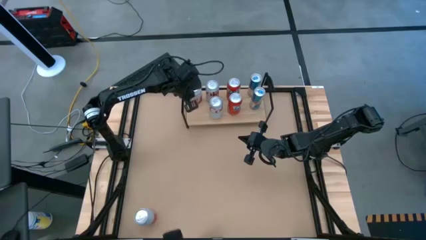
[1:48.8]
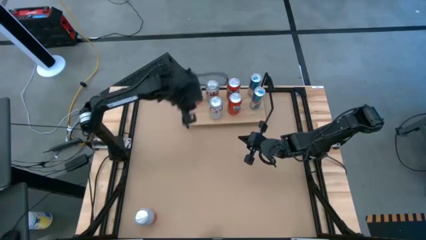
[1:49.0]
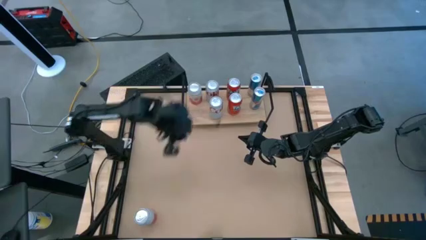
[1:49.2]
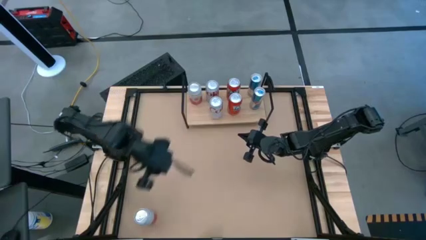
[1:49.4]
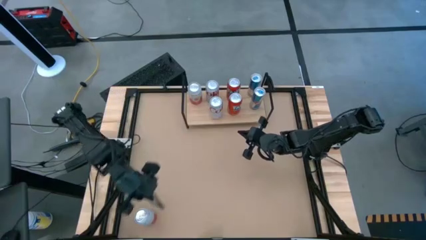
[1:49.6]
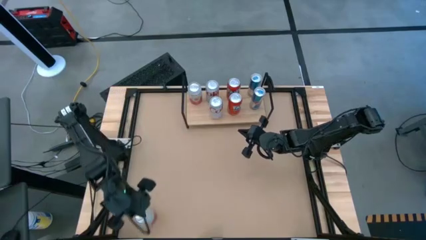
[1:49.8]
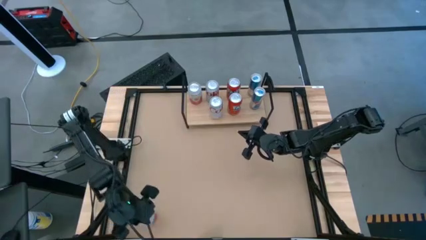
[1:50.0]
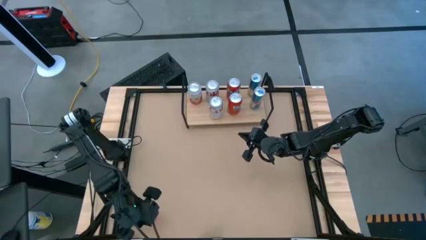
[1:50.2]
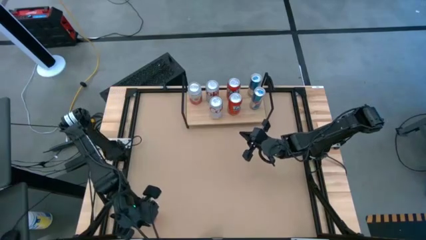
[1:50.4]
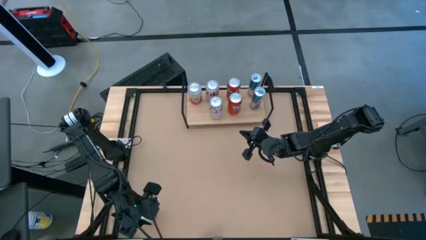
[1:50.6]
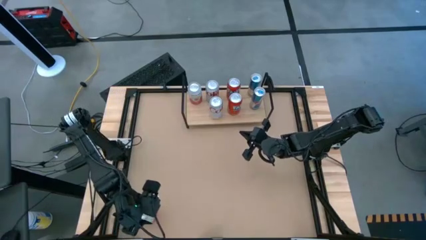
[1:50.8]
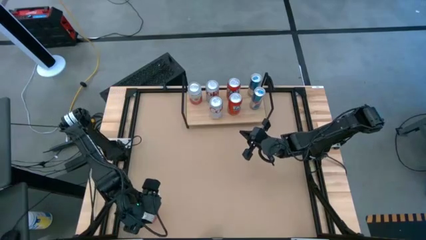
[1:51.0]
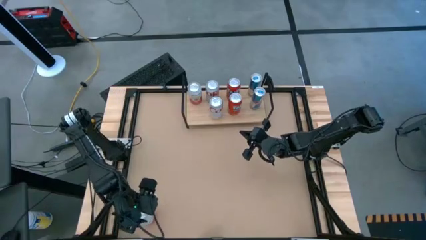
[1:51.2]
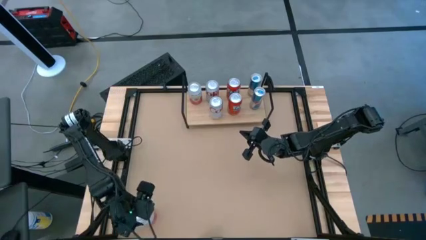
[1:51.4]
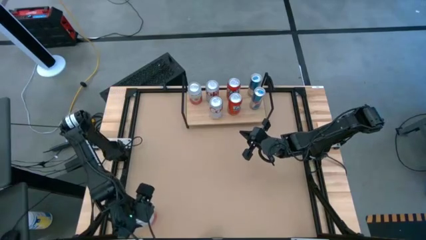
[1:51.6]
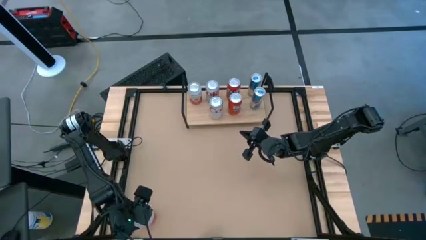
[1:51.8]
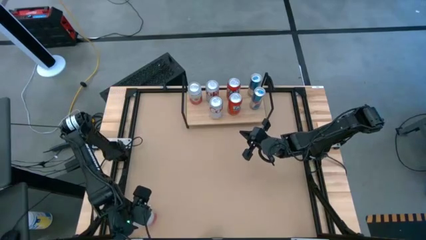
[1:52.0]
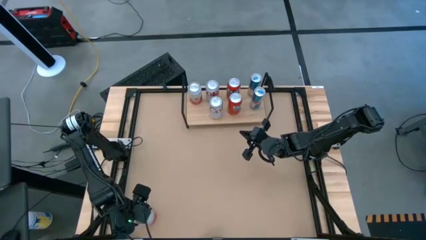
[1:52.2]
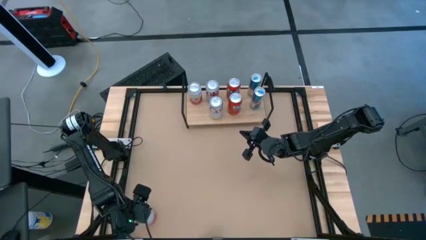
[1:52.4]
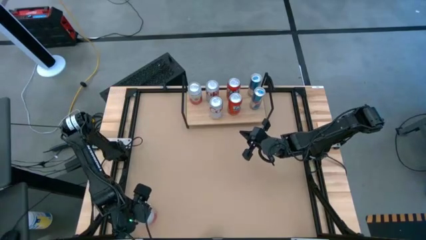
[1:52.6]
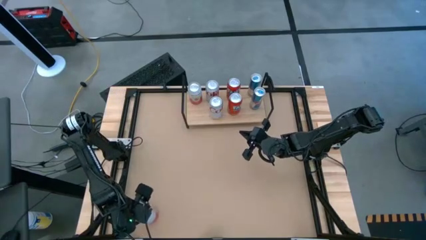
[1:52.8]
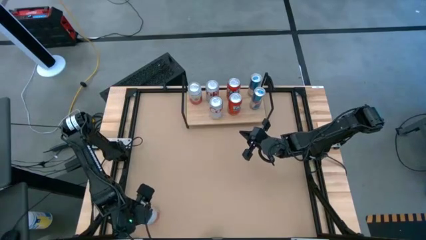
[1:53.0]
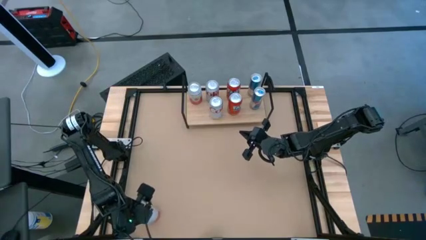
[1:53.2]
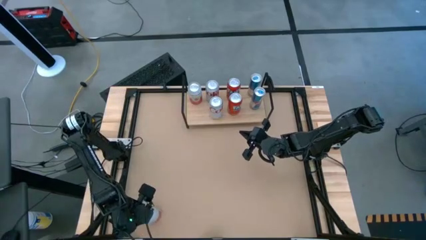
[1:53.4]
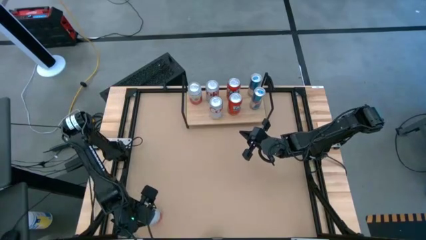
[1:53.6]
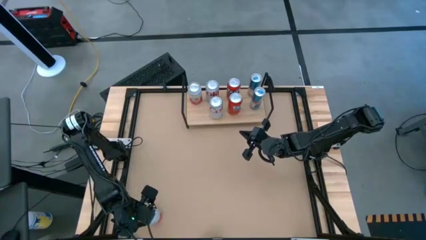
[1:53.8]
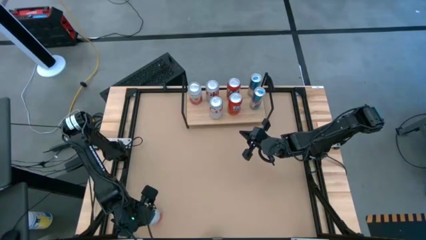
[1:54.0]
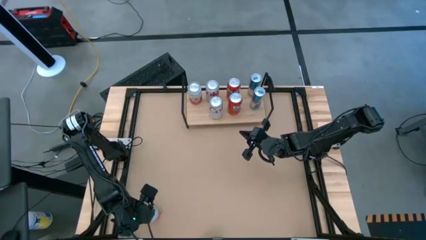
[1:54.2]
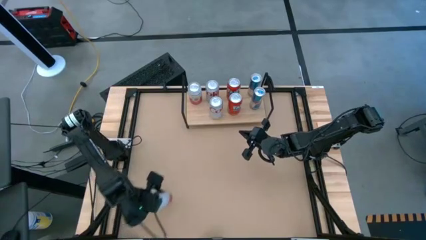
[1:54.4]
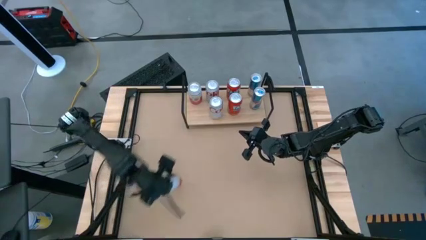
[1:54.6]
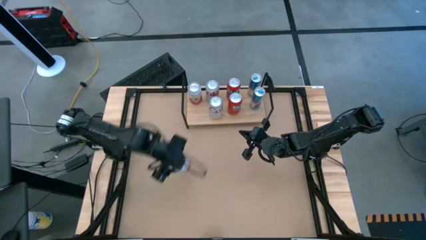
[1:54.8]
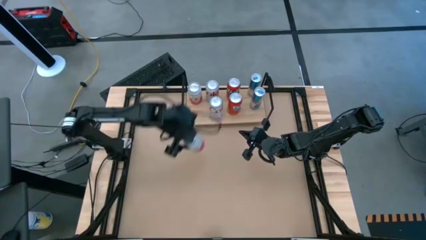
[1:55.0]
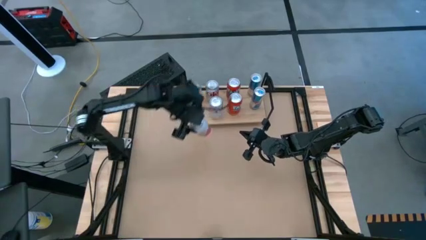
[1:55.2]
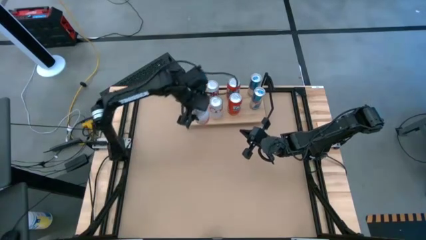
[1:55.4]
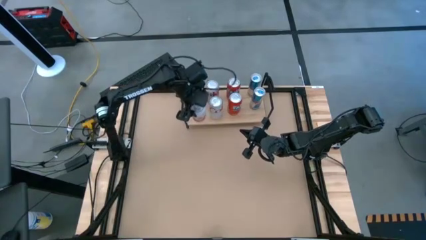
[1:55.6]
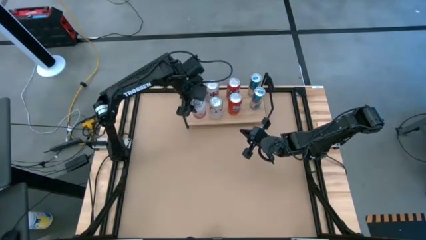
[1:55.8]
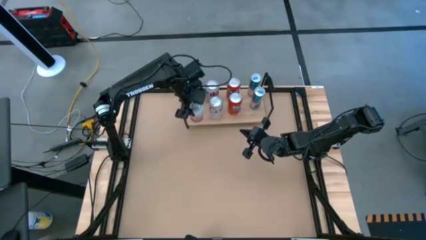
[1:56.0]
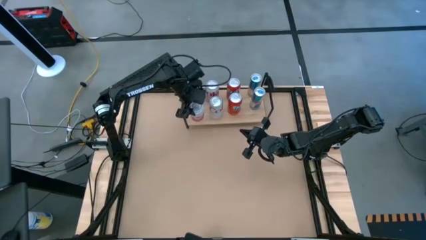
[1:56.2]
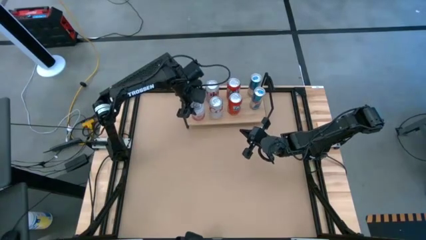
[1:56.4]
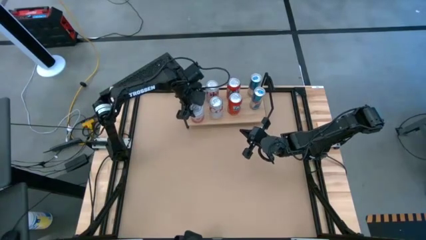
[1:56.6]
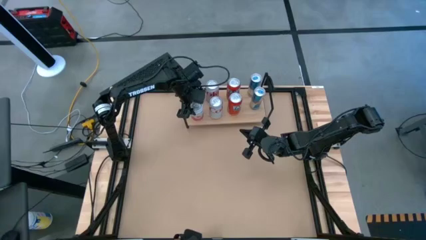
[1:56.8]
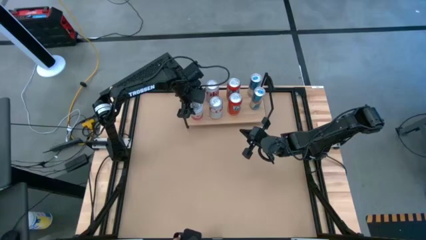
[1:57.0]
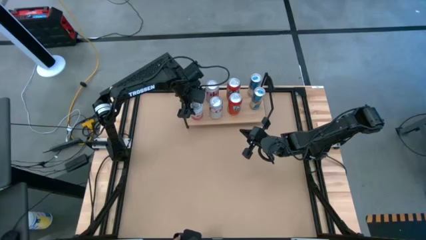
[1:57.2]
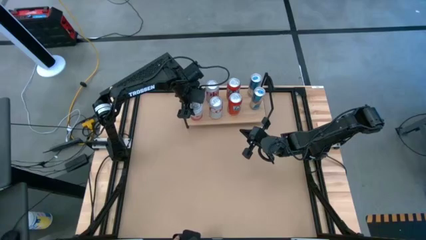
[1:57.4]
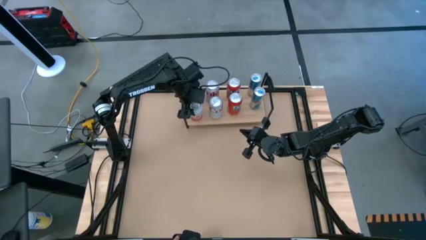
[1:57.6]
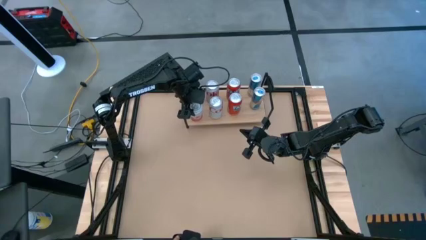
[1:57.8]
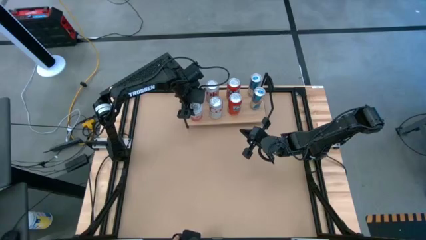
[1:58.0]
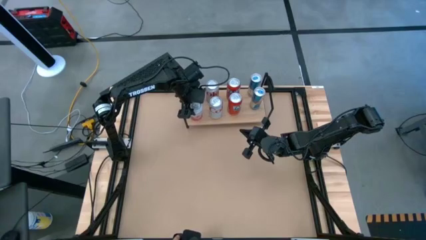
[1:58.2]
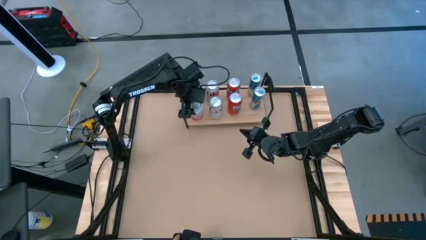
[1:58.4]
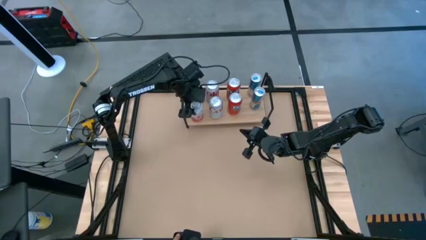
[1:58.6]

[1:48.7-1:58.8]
Task: Place canned beverage on shelf
Put the pink and white soda can on the shelf aligned with the other pink and white soda can on the shelf

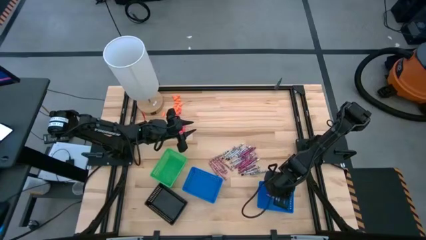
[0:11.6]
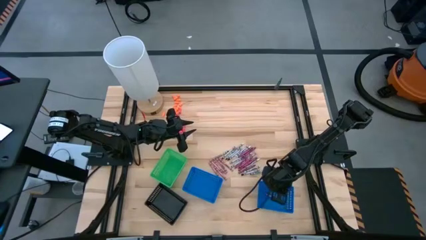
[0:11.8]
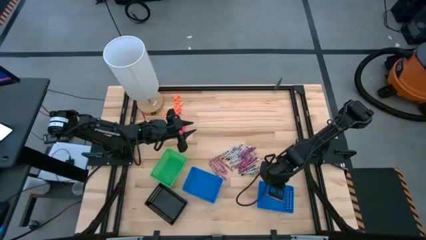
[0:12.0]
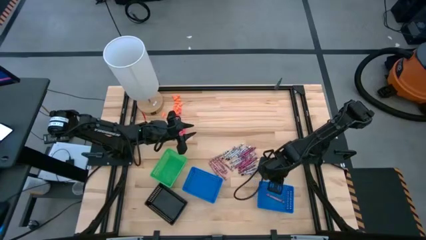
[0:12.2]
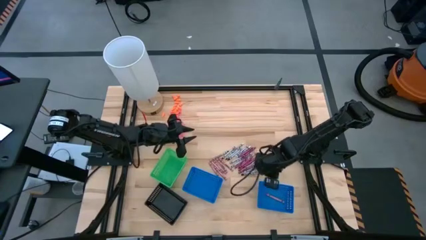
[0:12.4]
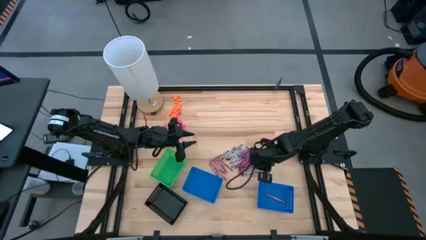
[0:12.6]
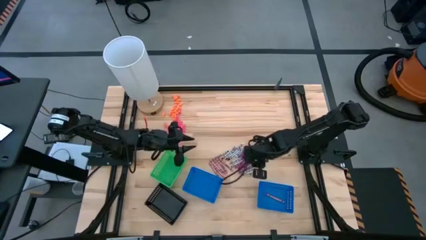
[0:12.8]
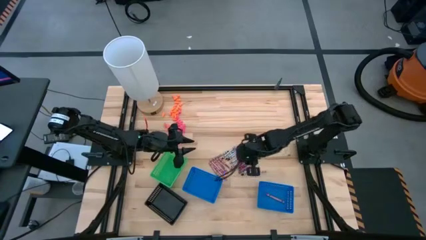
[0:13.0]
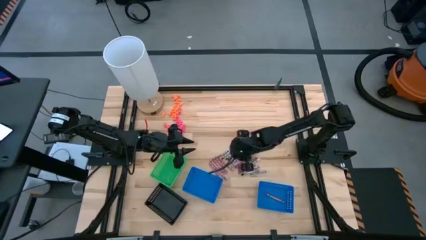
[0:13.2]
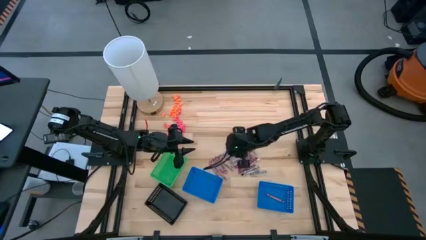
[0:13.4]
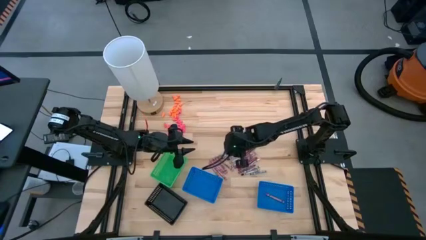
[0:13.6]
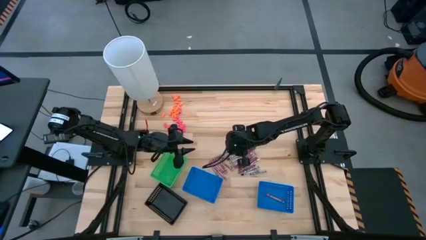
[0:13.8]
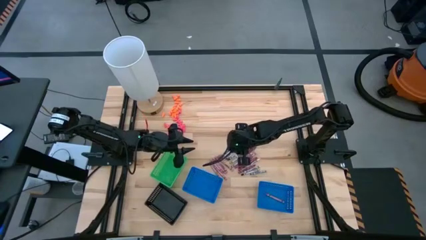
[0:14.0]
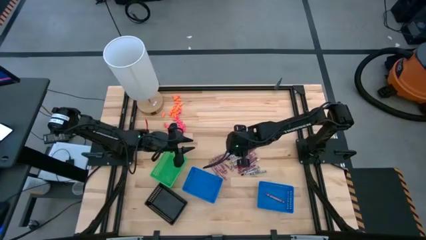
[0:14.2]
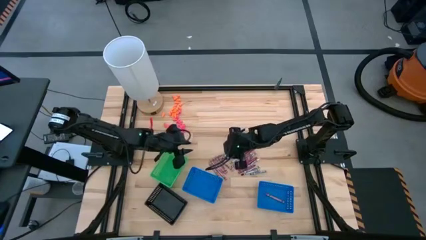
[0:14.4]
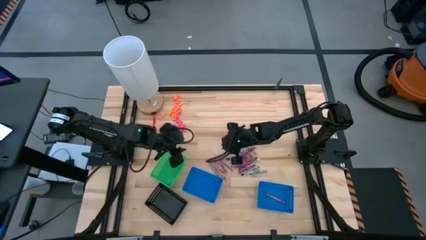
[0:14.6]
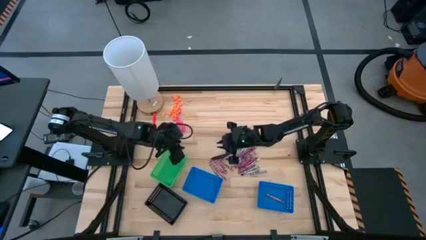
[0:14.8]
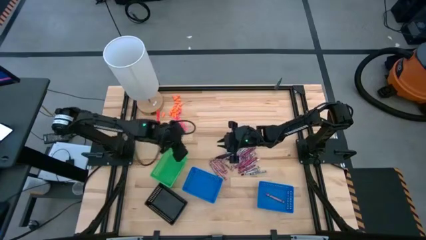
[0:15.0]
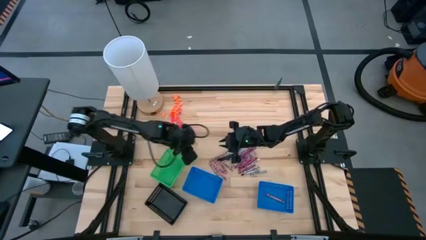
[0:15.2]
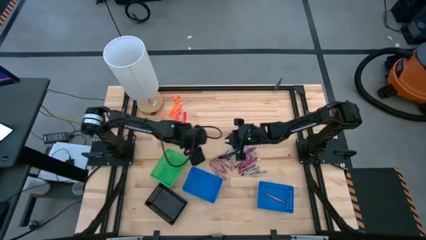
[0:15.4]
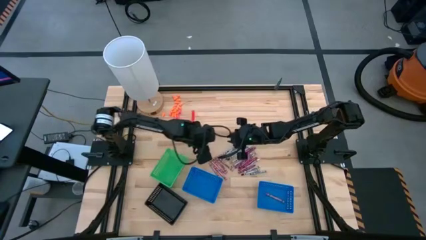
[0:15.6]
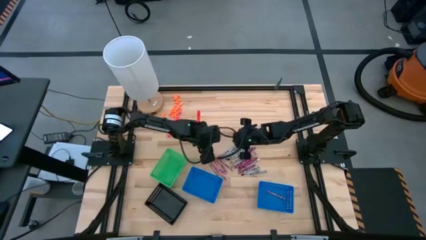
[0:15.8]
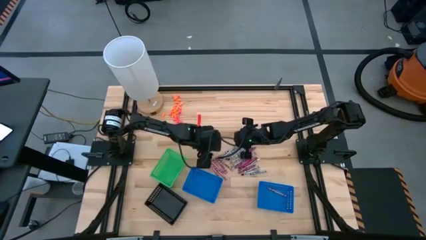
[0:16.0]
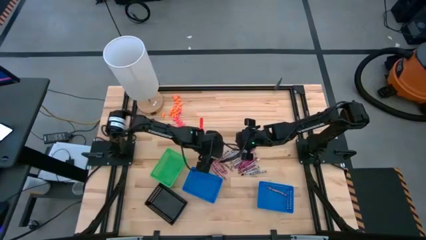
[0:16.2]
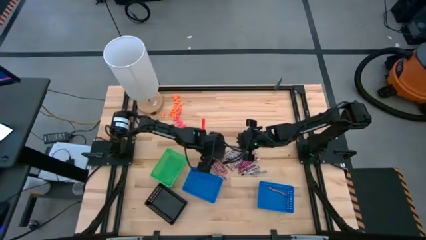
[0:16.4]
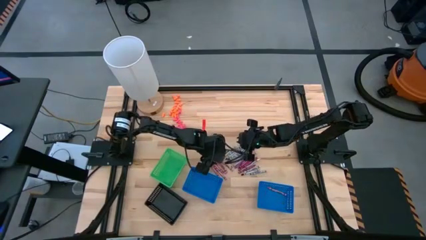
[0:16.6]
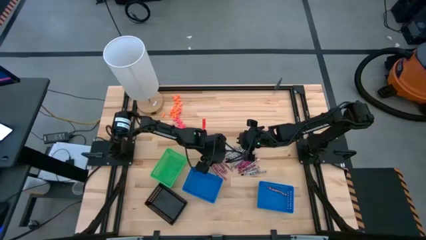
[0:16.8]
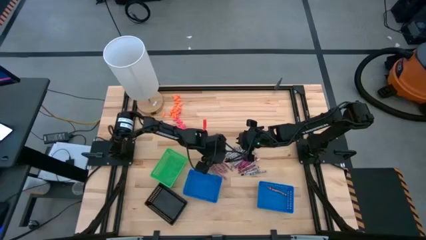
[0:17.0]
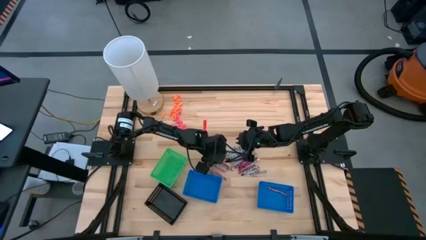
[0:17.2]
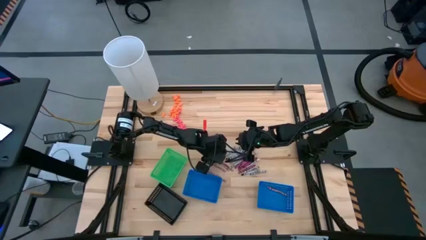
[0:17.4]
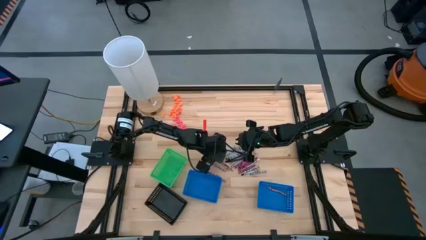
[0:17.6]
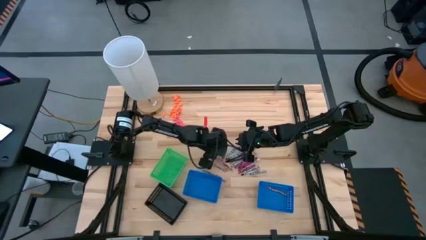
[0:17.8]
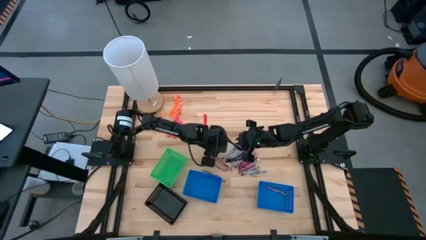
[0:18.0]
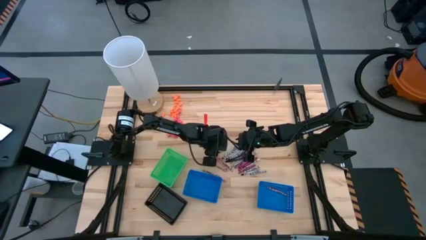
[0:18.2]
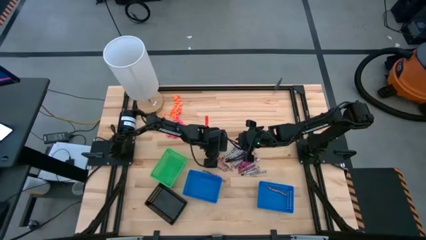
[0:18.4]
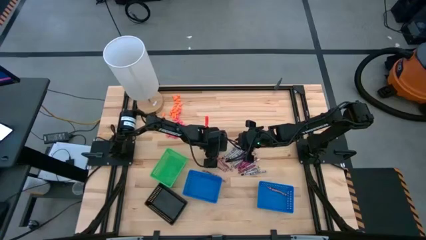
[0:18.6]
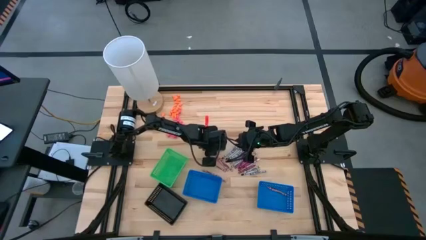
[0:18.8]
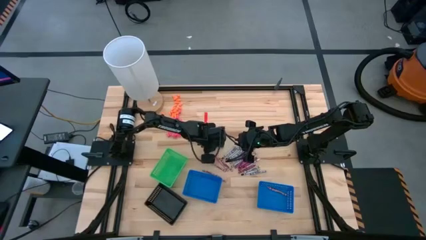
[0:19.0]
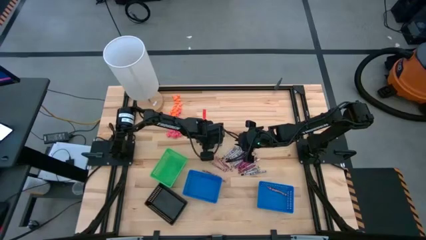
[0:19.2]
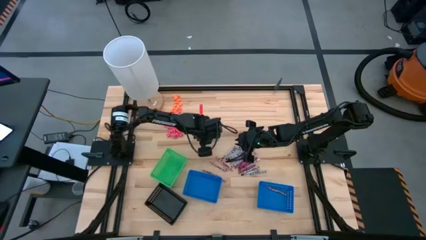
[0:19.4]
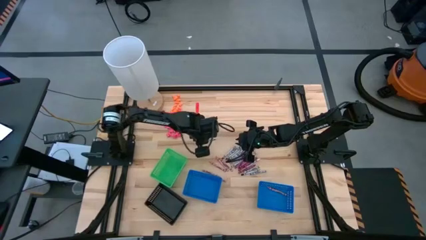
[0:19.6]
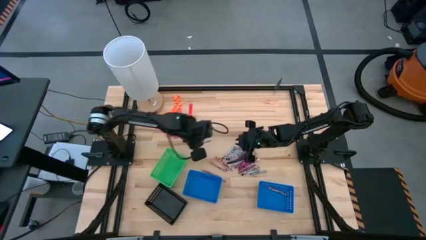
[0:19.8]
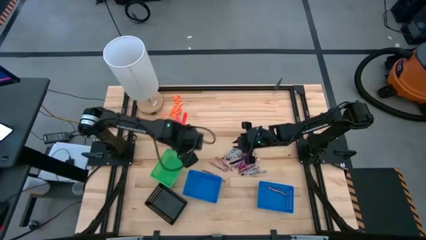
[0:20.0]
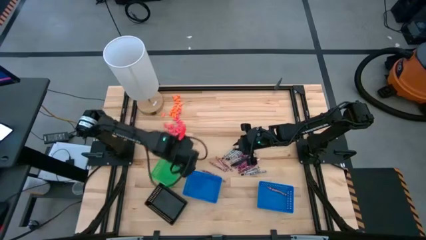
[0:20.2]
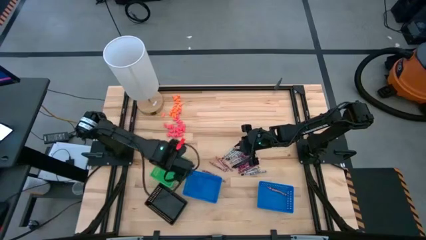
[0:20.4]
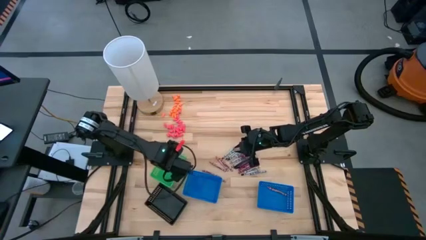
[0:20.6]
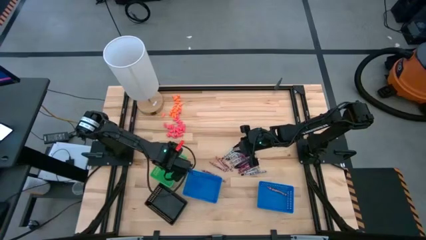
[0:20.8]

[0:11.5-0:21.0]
Task: Sort crayons
Put the black crayon into the green basket
